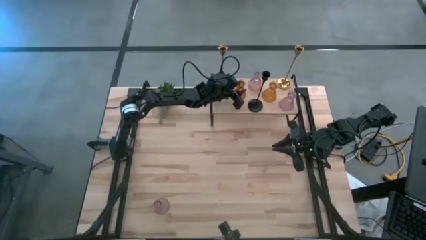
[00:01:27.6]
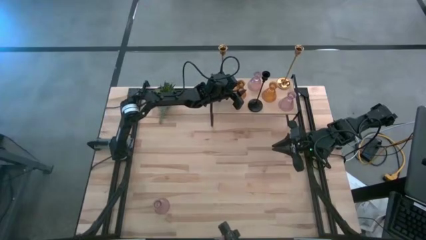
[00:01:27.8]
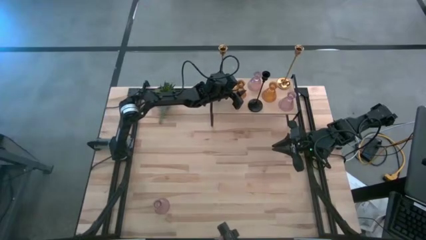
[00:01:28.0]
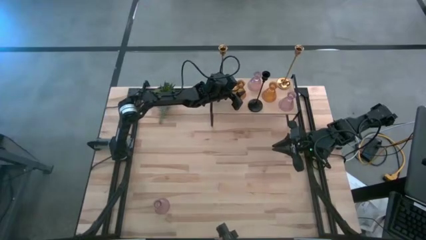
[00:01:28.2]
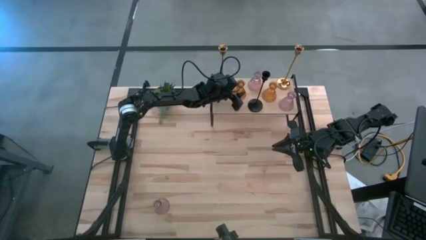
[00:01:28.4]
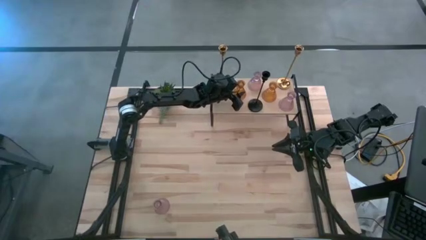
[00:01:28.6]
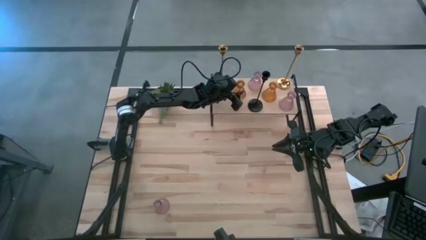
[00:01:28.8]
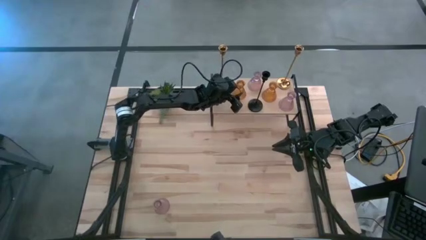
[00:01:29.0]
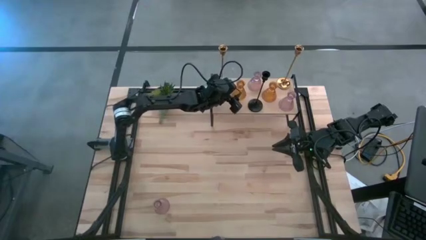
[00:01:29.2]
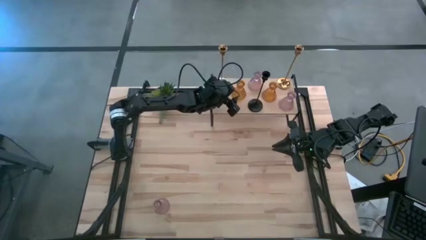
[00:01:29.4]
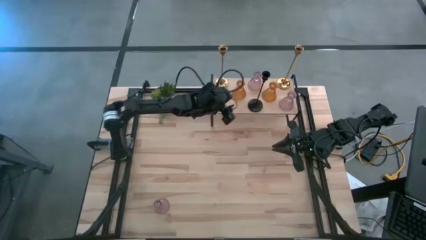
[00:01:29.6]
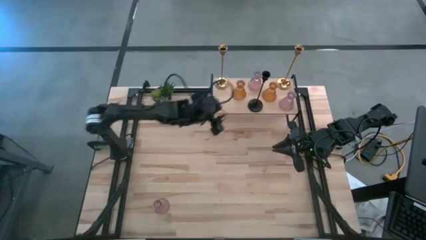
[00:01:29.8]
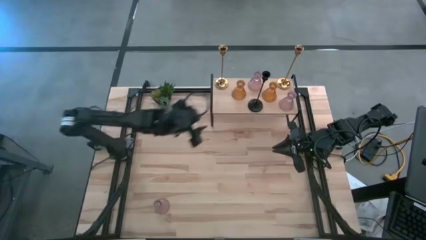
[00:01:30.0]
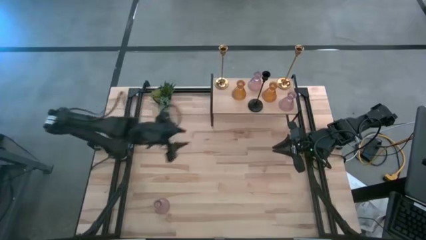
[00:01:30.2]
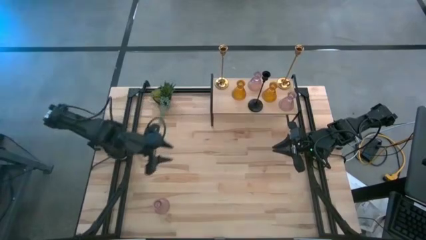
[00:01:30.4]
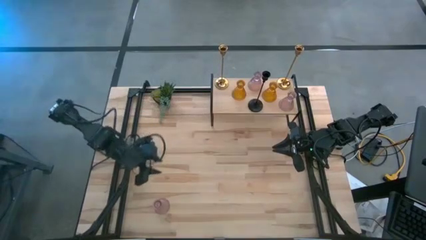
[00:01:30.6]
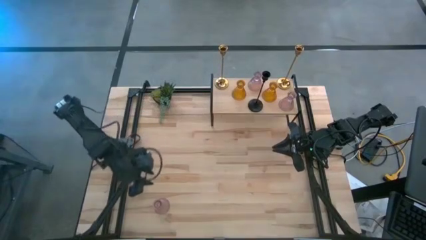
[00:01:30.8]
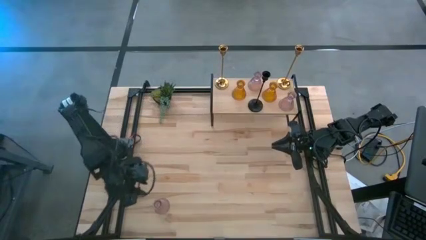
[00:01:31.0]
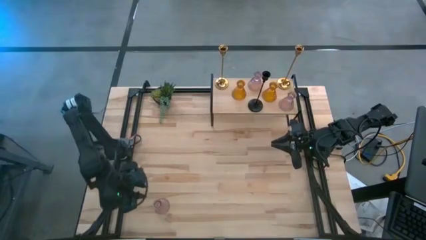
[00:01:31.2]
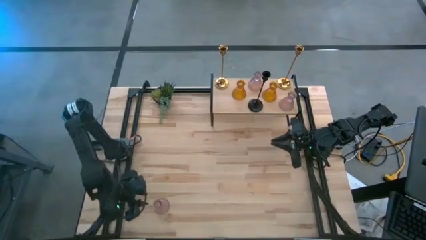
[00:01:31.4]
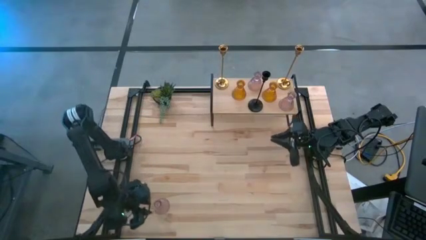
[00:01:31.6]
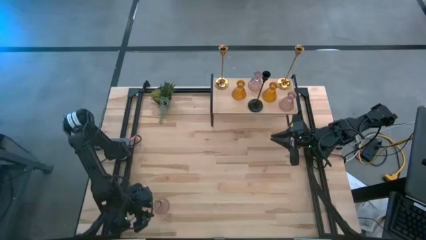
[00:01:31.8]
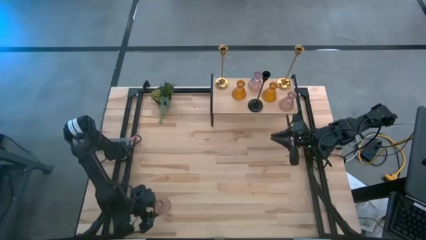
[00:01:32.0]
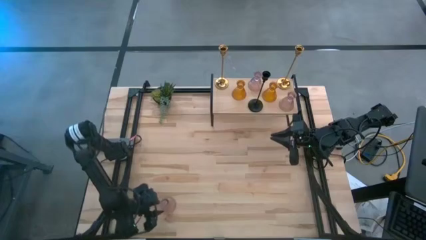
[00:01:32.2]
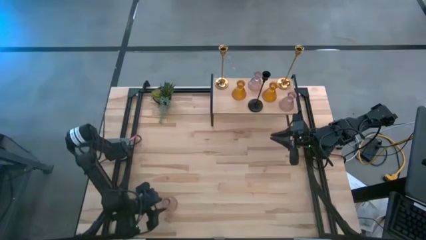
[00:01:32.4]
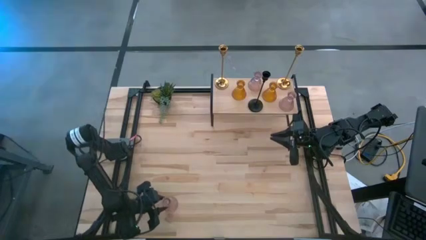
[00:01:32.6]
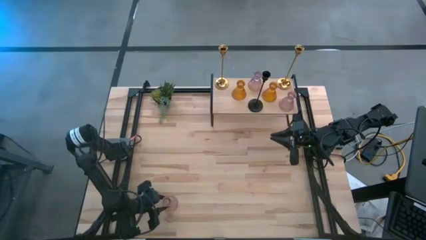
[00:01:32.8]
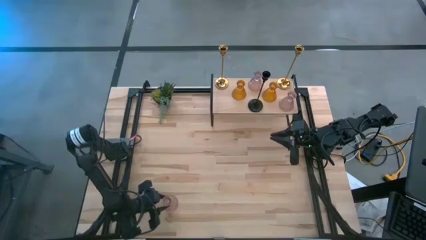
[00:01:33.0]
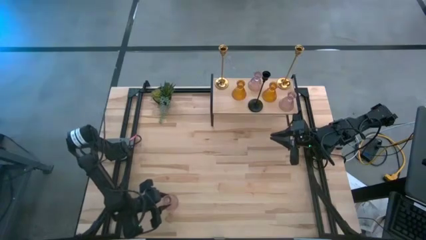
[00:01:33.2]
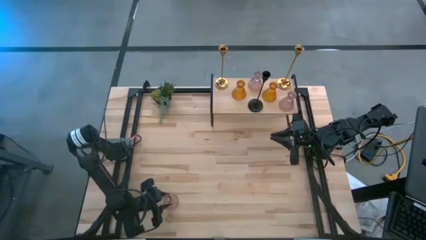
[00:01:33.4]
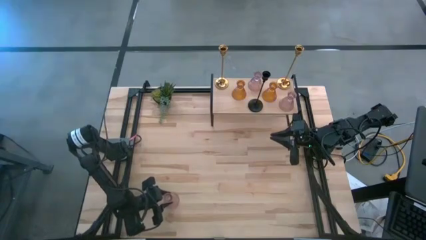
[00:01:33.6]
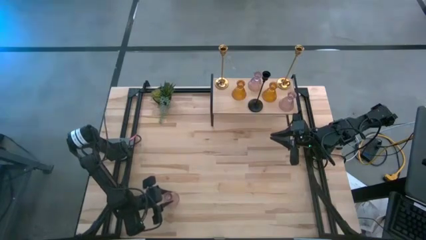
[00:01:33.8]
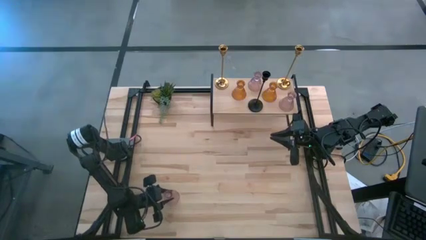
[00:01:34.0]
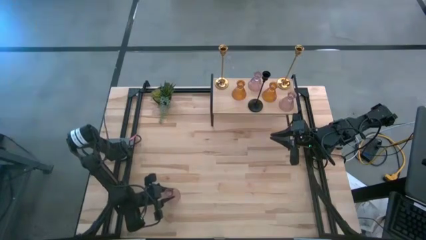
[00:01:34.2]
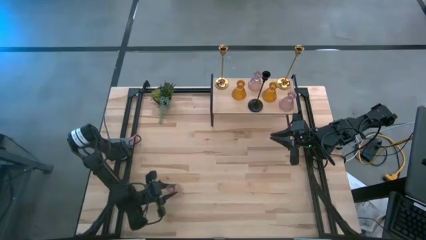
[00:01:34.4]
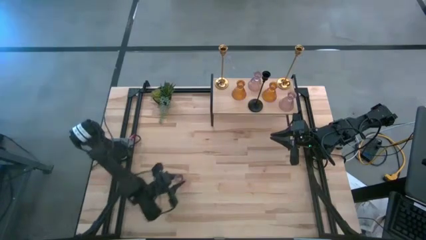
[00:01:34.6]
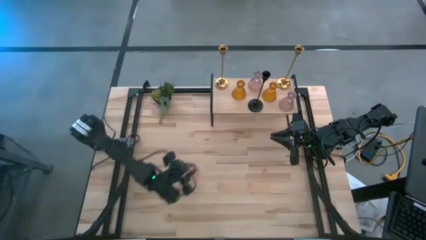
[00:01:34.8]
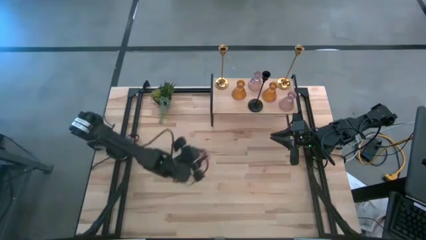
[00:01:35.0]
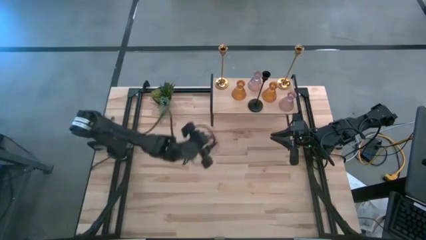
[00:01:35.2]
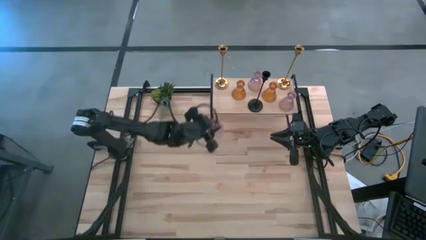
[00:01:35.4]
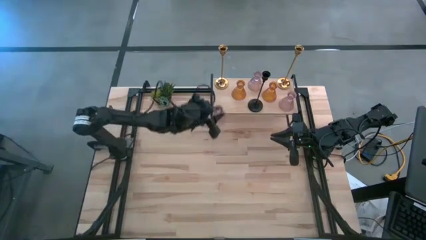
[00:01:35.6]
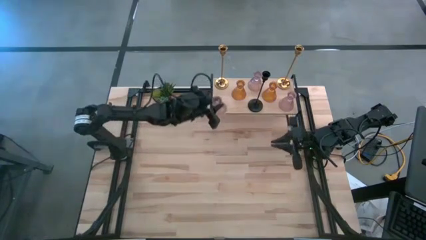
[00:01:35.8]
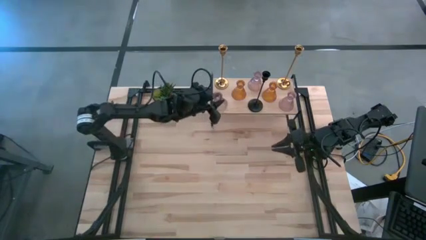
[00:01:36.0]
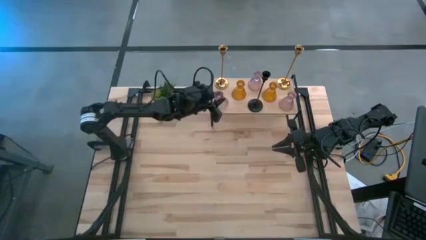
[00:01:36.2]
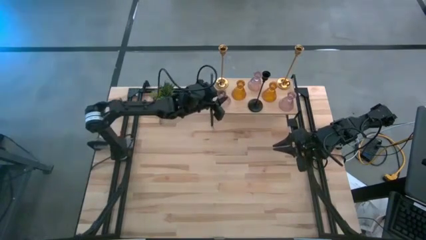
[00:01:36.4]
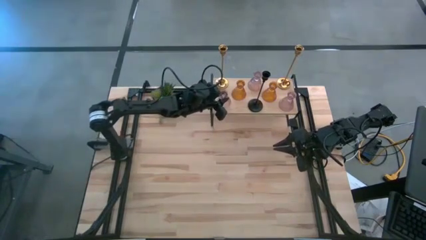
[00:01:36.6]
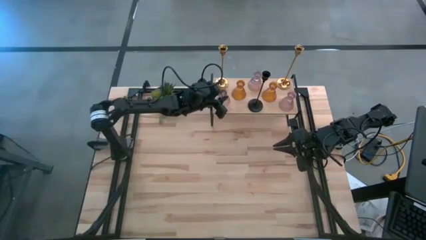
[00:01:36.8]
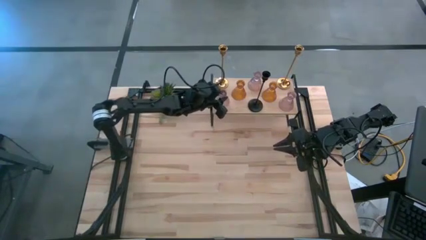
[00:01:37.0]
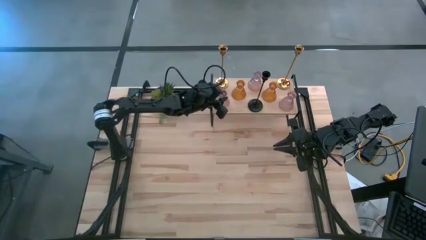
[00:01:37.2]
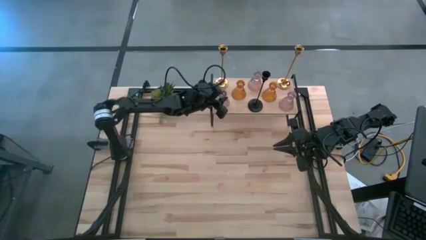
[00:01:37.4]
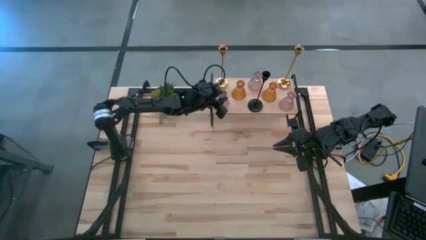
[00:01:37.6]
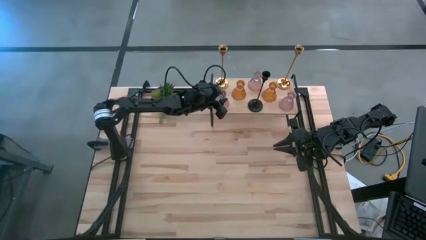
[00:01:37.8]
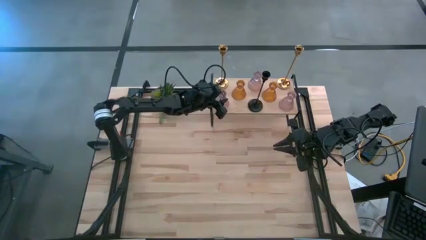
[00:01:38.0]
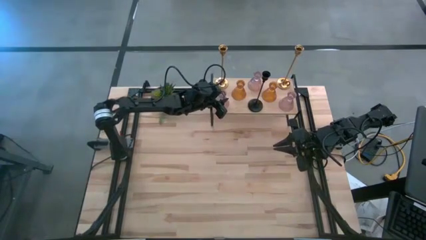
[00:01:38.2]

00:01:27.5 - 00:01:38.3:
Task: Pick & Place candle stick holders
Put the pink candle holder on the shelf

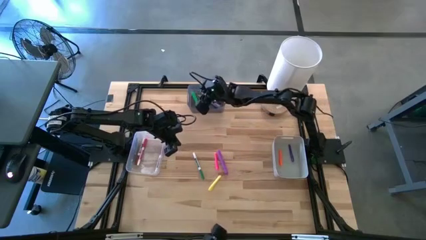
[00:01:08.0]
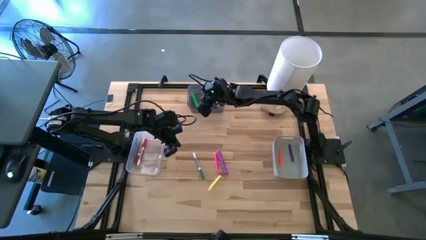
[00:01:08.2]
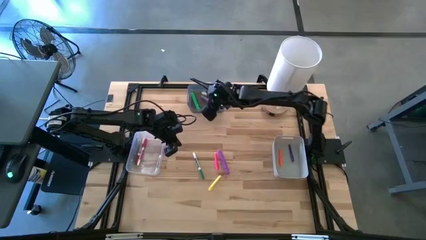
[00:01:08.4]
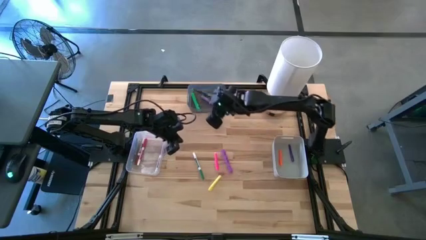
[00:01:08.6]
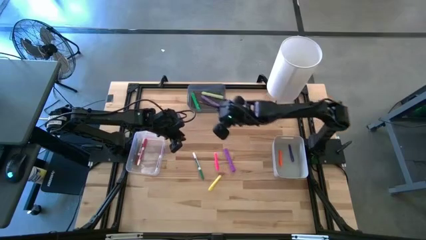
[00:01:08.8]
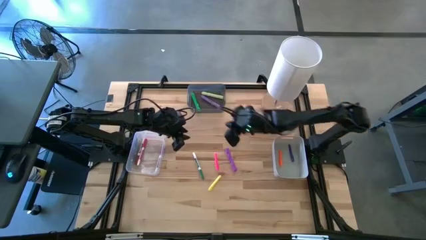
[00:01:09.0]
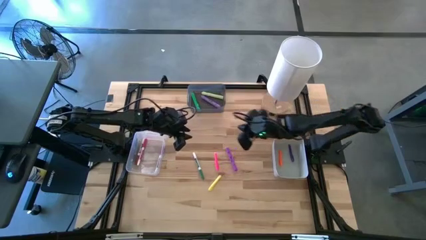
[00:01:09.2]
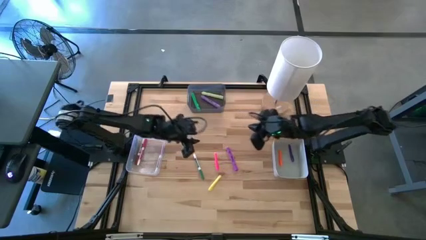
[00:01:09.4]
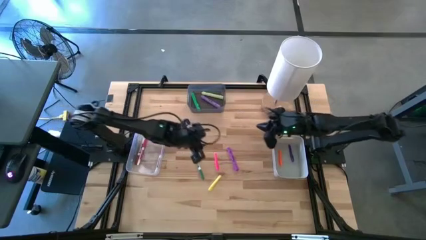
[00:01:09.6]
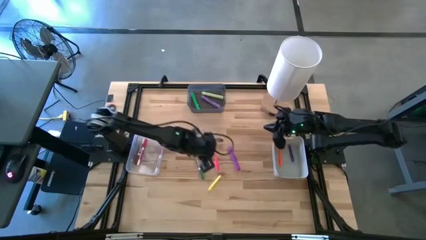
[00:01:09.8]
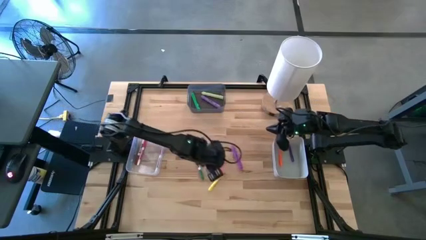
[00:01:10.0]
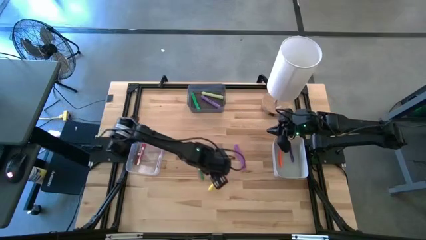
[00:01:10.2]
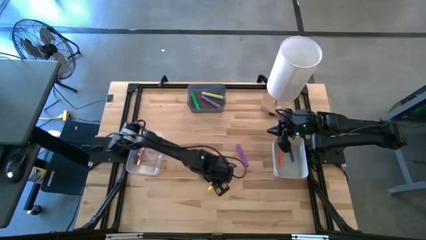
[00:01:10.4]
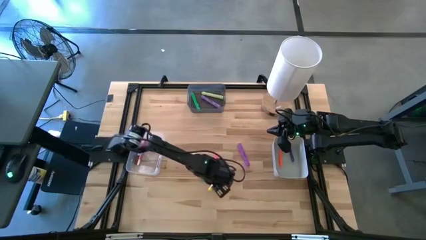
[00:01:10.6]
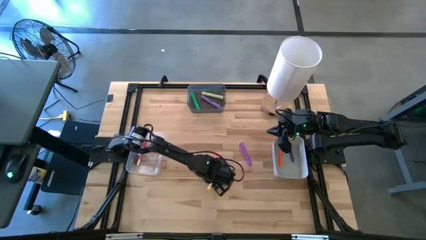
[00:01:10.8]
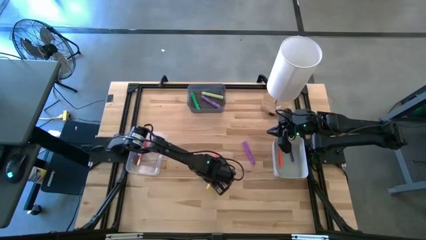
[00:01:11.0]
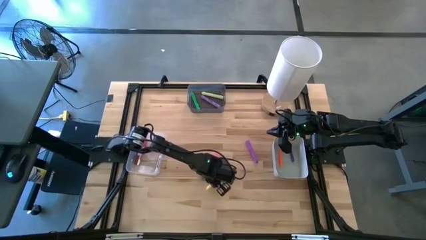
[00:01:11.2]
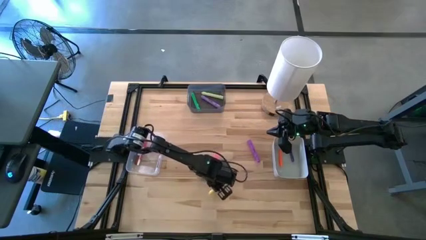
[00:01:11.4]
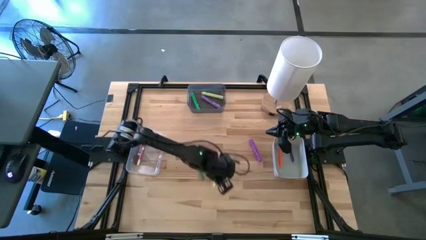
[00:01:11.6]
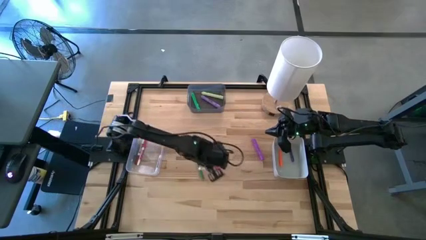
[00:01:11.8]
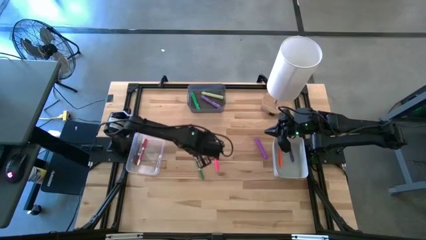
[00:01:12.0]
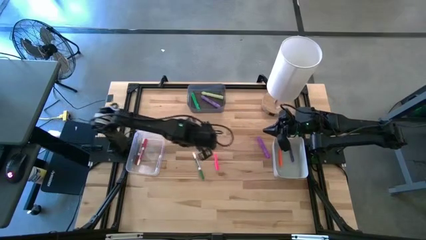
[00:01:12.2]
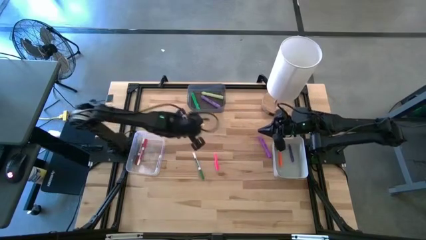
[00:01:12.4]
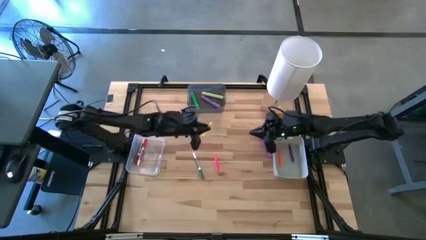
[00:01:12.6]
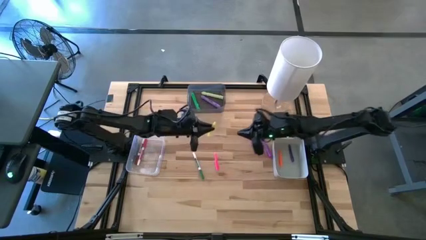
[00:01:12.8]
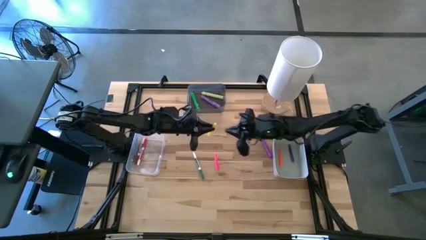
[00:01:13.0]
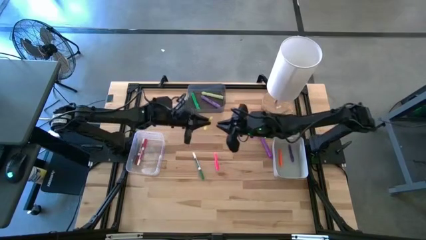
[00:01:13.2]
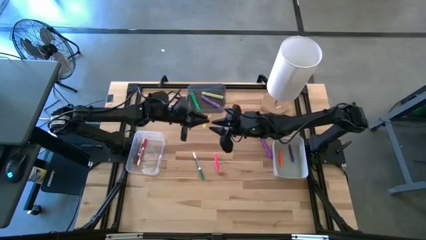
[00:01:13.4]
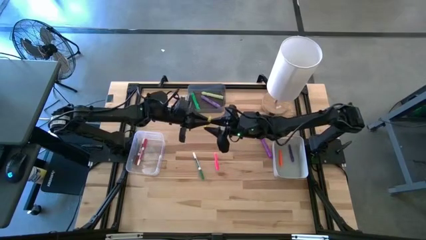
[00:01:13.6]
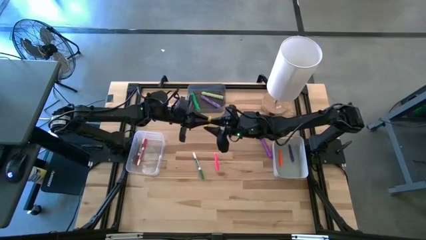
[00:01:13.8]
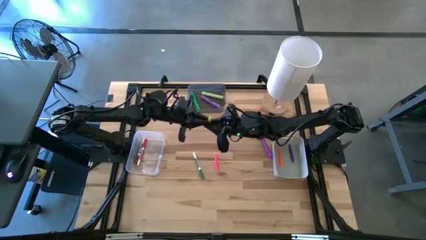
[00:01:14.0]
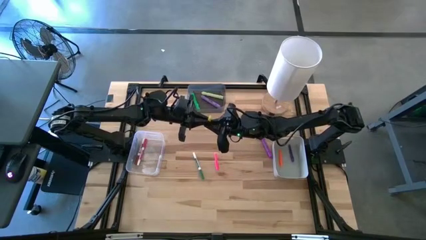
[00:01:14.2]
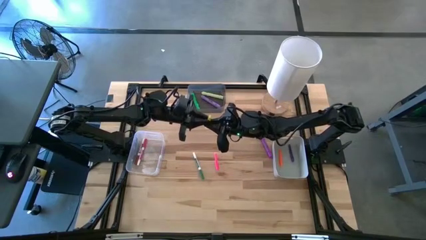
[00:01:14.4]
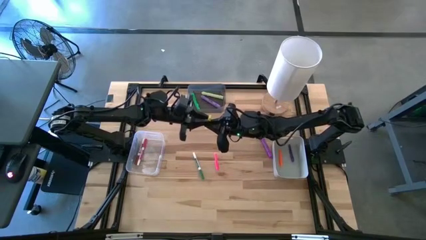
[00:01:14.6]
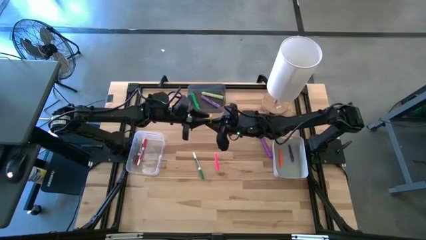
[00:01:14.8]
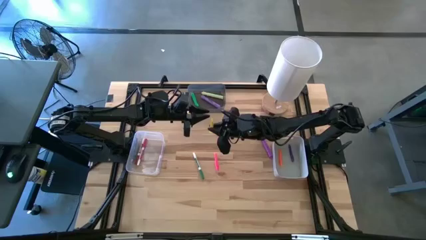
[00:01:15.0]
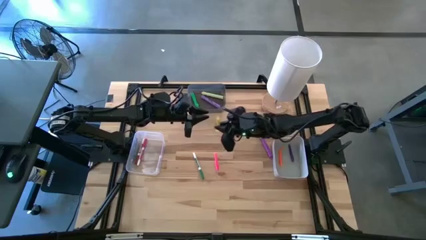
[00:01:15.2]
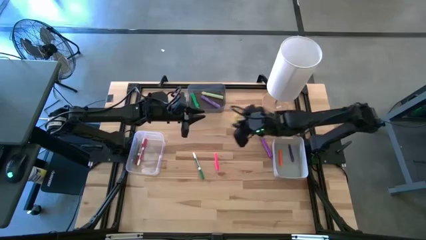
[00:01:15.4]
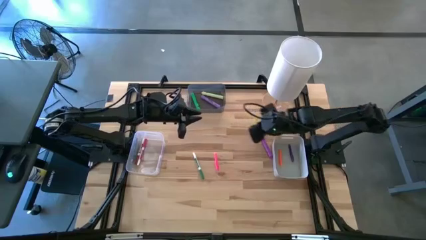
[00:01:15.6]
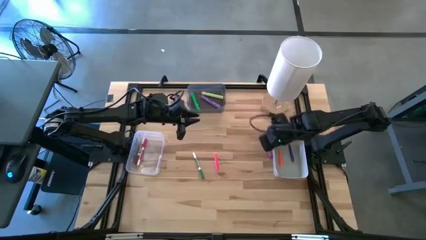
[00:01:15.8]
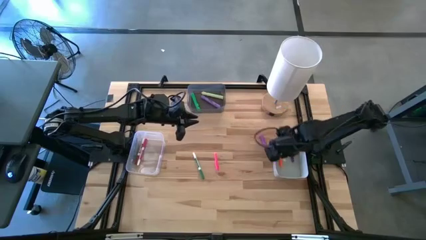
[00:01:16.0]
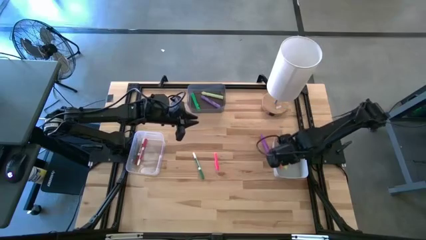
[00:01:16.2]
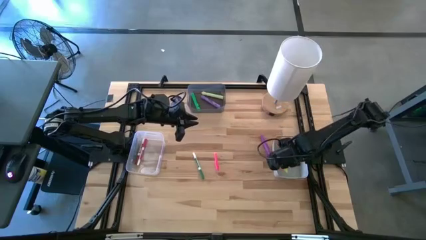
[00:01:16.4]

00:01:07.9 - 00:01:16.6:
Task: Pick & Place Markers
Put the yellow pen into the gray bin
